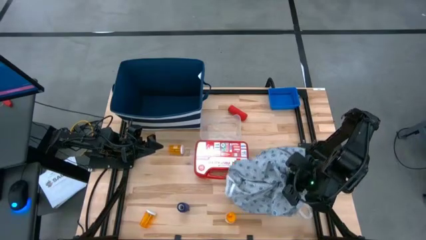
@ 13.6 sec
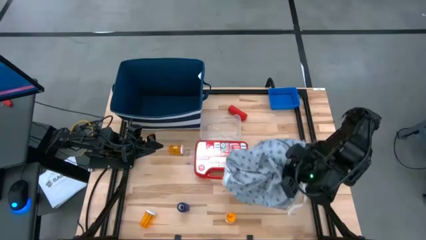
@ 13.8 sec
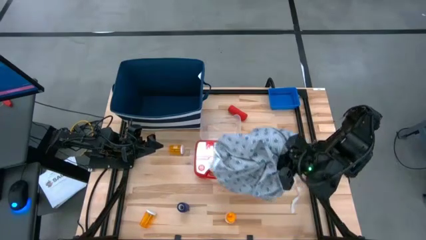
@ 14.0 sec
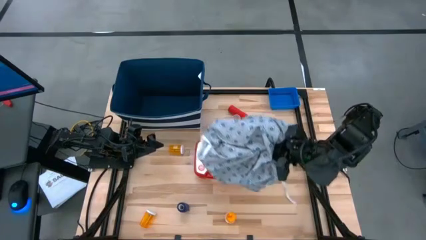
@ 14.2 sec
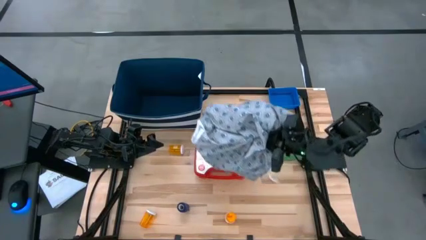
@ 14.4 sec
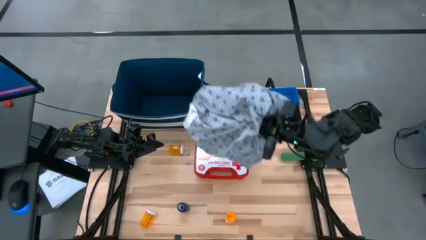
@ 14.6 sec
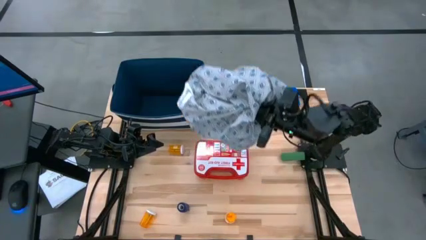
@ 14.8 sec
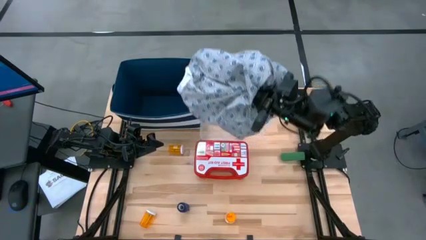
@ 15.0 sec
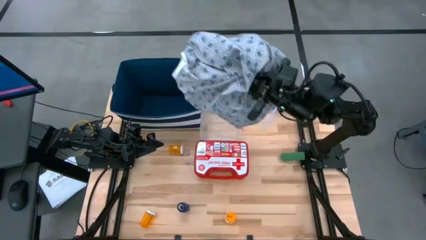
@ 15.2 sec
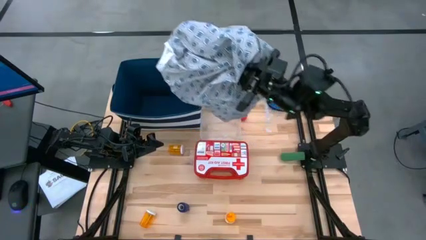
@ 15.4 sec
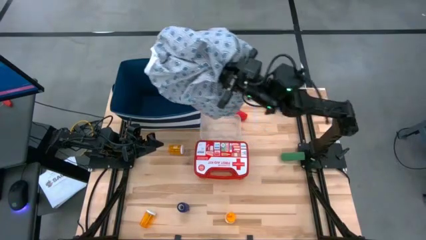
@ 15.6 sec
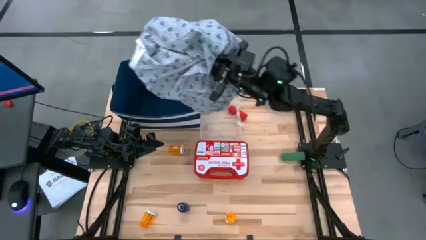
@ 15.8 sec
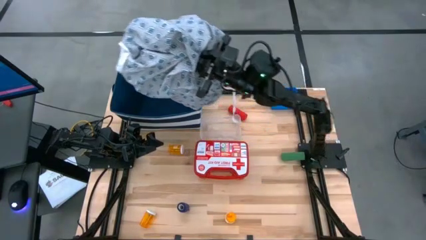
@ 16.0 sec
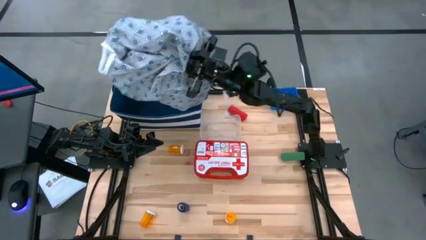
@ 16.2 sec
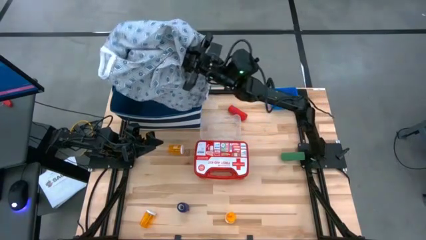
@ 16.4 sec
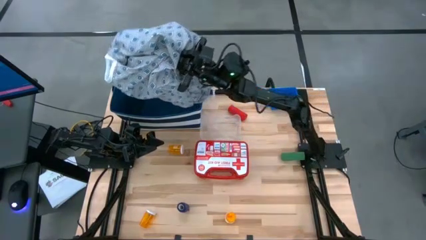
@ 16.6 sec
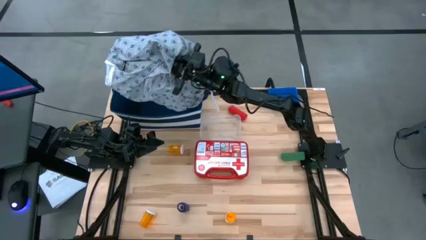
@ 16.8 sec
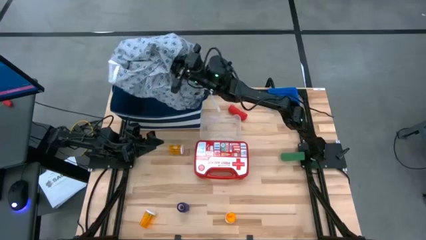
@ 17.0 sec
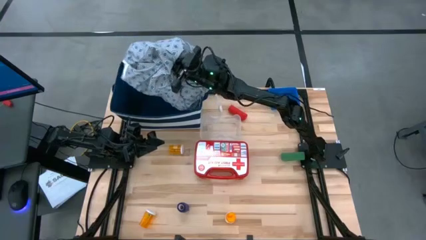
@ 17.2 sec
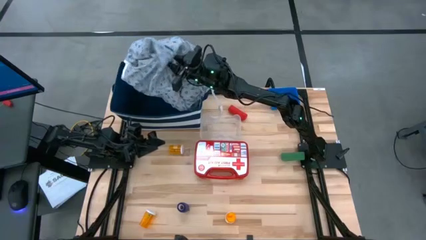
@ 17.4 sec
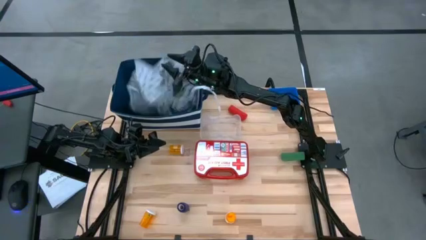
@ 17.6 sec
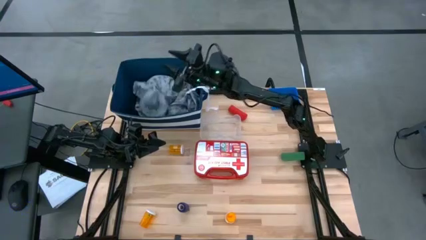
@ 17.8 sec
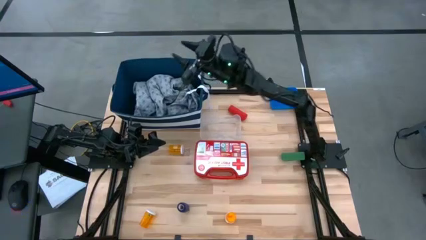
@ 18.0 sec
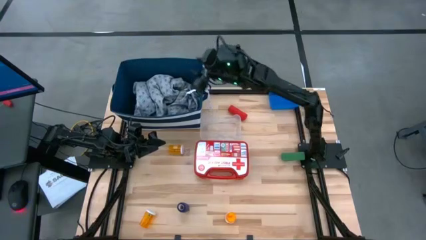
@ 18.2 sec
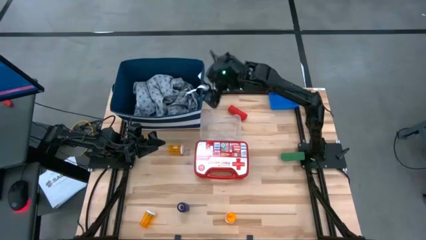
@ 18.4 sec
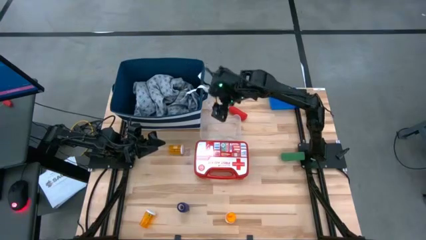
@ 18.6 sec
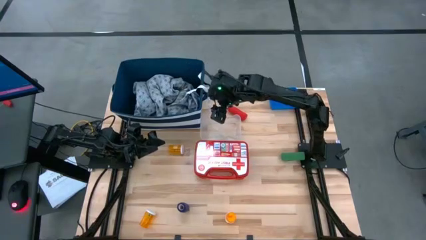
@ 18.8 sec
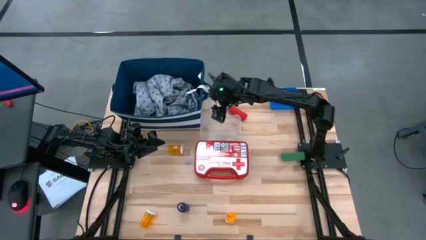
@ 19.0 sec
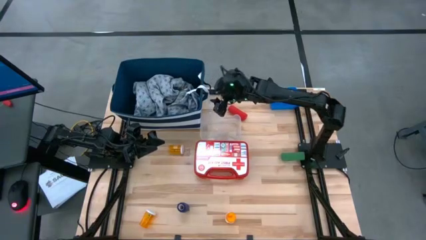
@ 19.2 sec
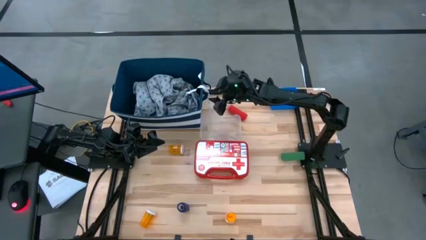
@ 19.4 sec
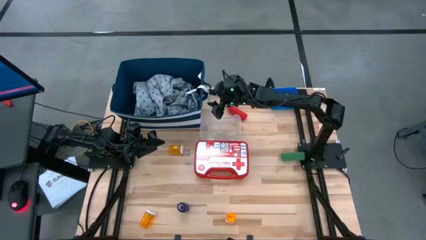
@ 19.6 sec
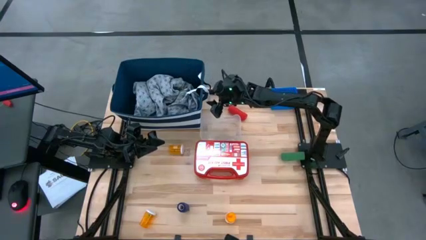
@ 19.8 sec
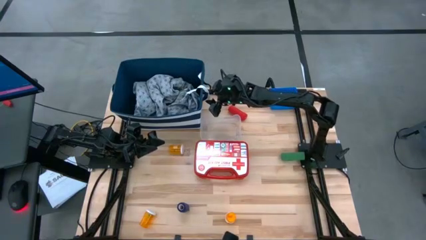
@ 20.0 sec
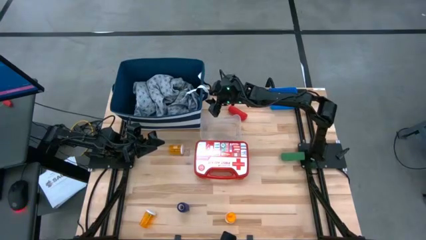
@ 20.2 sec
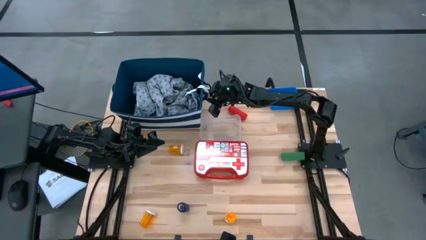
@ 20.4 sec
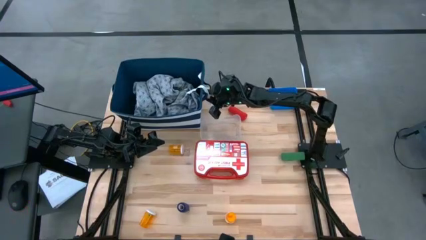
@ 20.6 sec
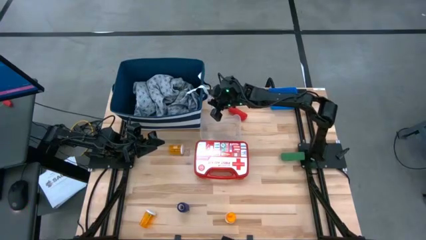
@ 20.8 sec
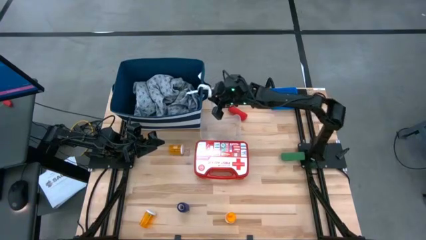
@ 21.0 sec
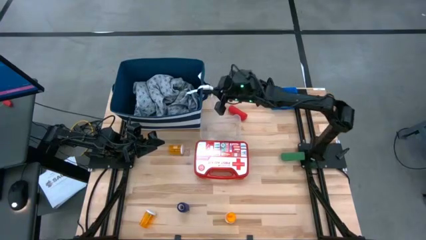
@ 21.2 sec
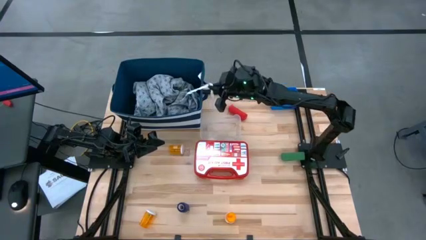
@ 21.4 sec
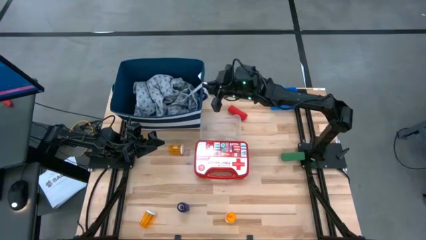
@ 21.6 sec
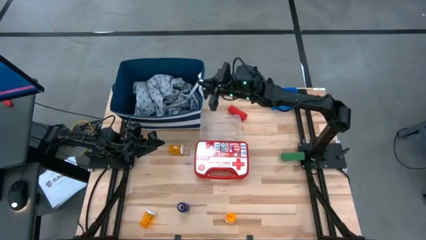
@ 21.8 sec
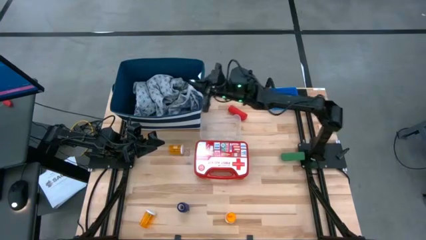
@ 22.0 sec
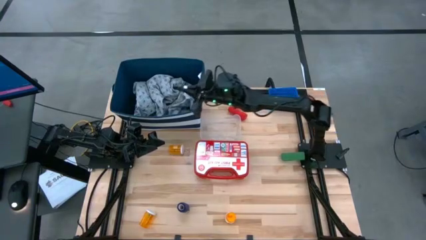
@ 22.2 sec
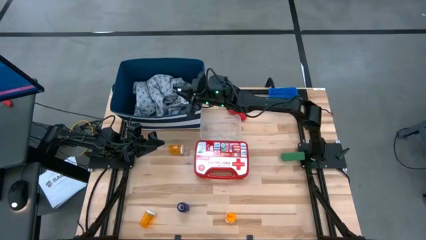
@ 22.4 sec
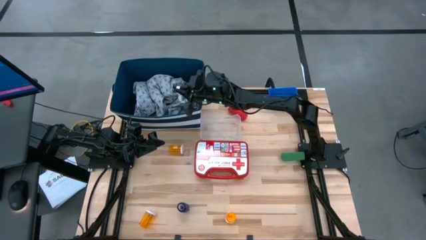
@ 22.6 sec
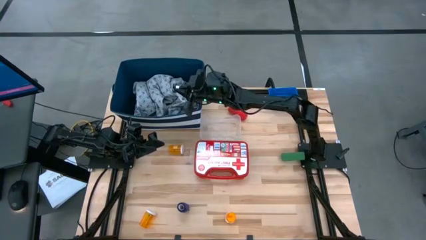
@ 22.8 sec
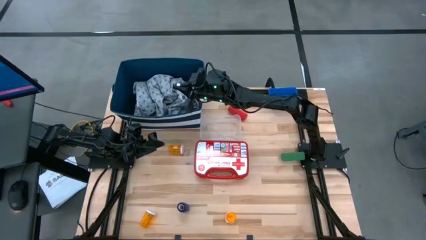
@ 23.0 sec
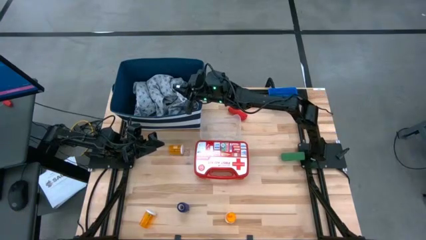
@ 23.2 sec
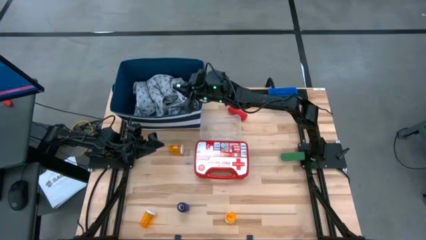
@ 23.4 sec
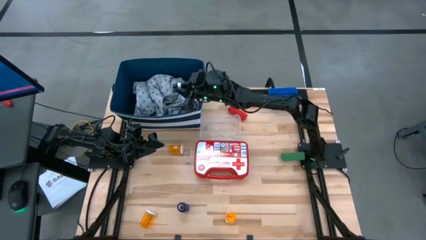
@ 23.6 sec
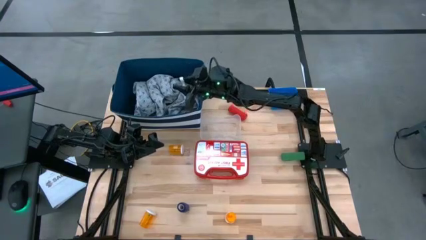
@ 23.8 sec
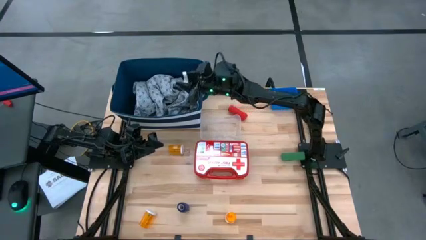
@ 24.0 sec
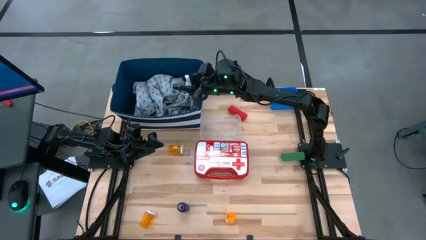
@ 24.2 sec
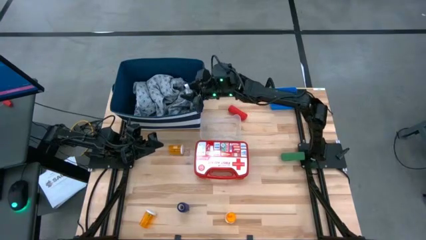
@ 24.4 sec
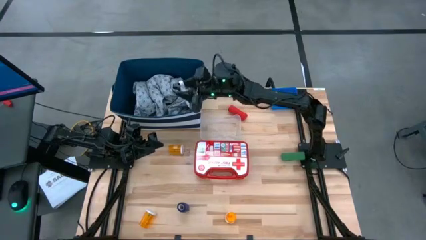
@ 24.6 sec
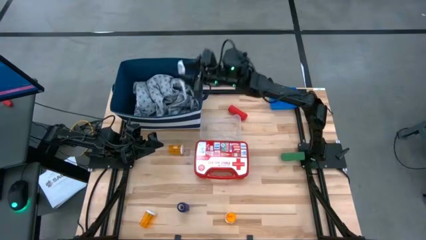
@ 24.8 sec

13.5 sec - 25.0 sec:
Task: Pick & place medical supplies in basket/bin
Put the gray patient gown into the blue laundry organizer

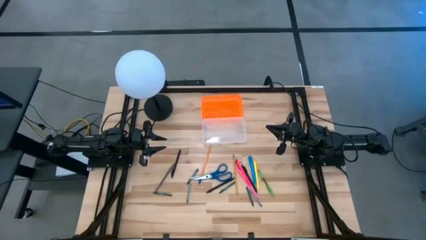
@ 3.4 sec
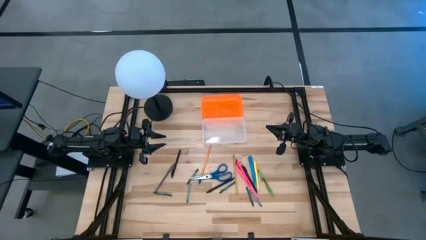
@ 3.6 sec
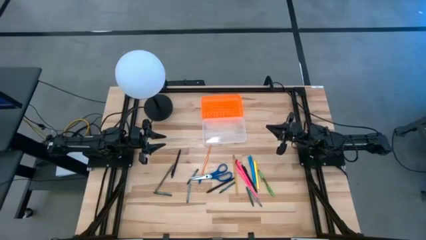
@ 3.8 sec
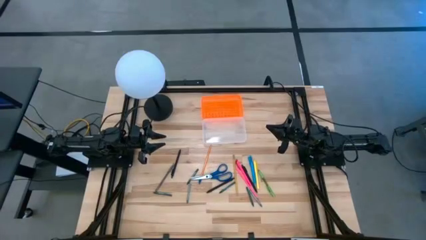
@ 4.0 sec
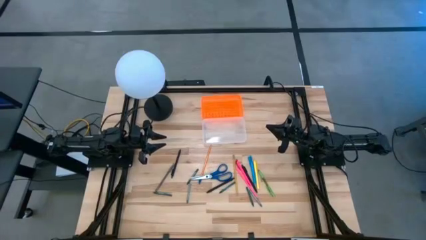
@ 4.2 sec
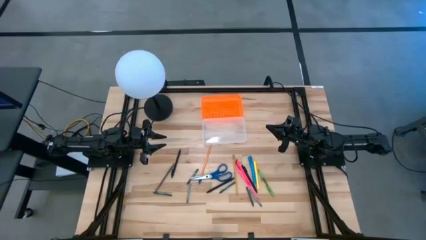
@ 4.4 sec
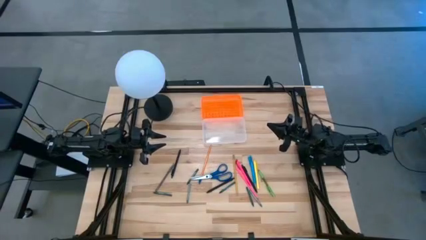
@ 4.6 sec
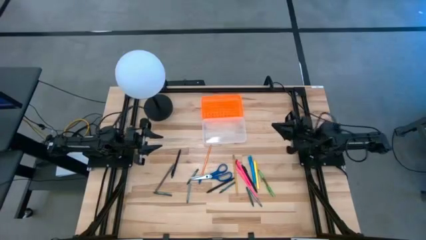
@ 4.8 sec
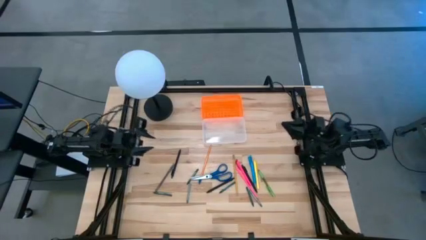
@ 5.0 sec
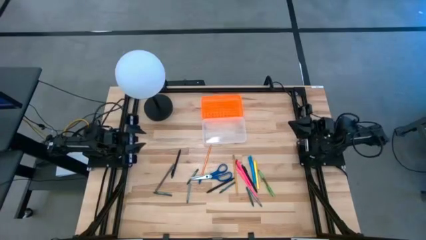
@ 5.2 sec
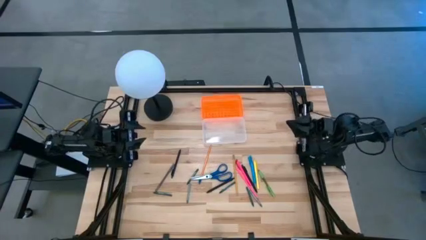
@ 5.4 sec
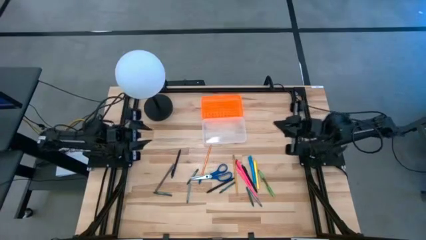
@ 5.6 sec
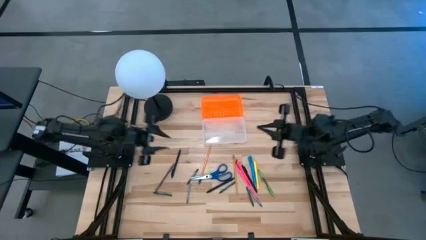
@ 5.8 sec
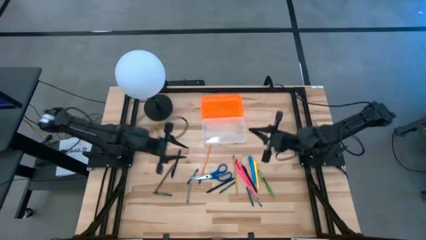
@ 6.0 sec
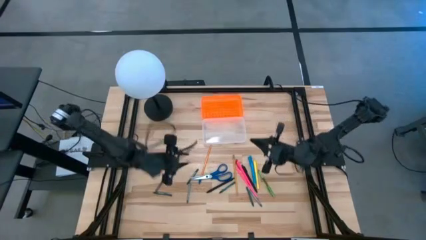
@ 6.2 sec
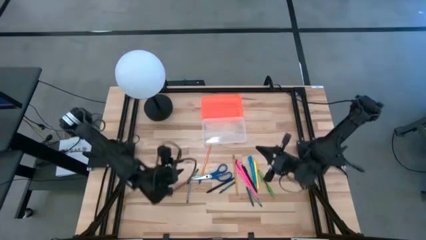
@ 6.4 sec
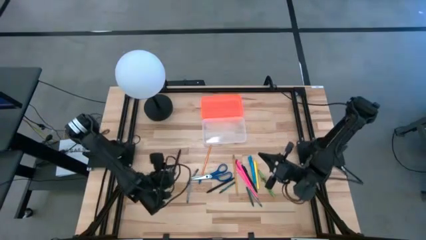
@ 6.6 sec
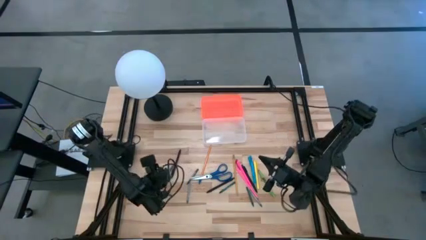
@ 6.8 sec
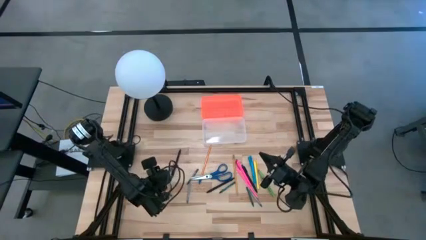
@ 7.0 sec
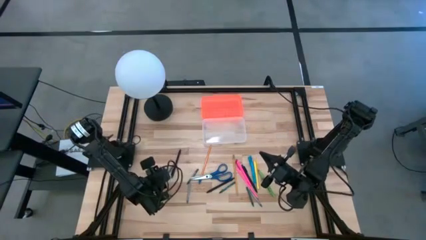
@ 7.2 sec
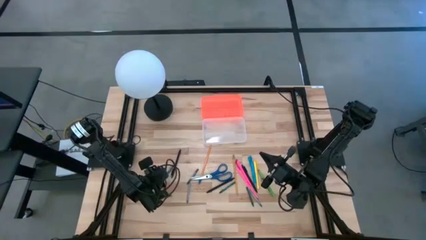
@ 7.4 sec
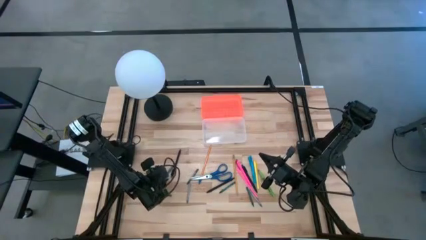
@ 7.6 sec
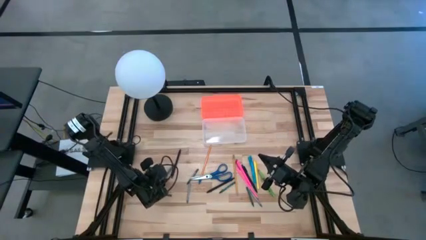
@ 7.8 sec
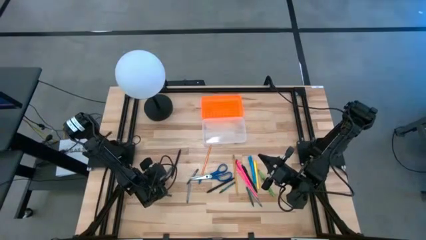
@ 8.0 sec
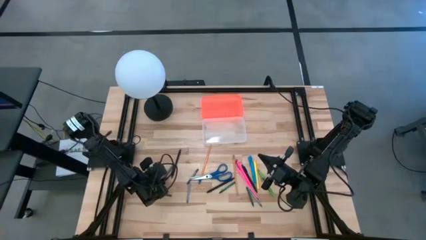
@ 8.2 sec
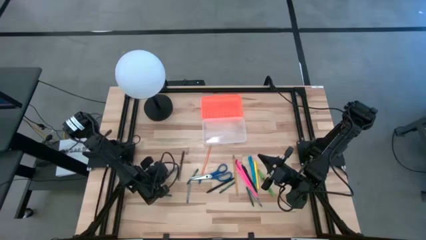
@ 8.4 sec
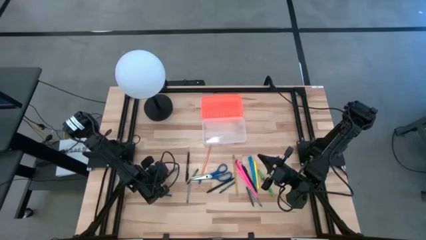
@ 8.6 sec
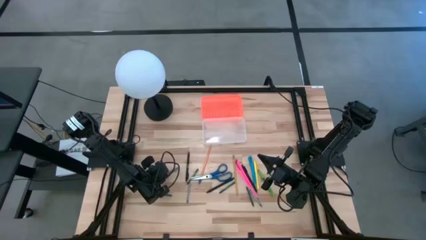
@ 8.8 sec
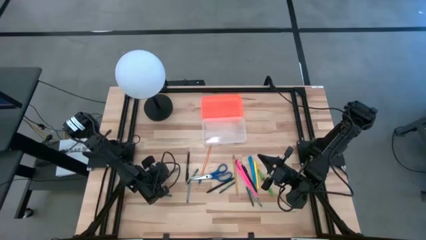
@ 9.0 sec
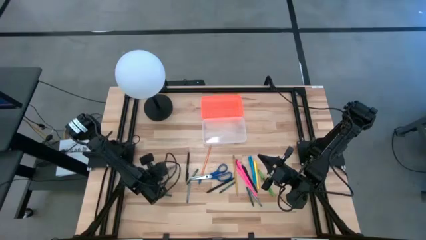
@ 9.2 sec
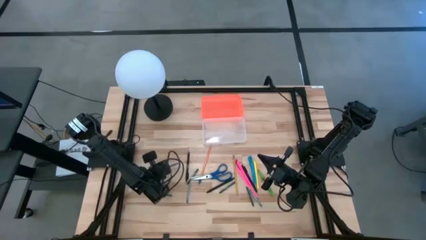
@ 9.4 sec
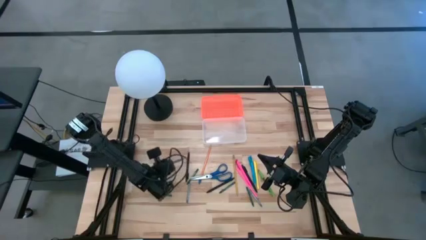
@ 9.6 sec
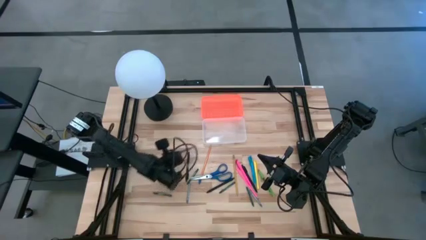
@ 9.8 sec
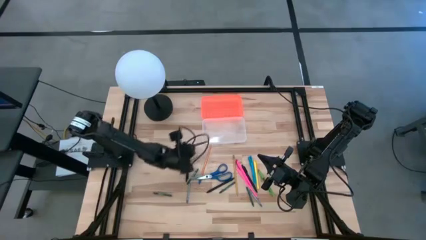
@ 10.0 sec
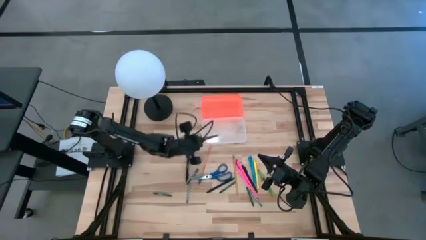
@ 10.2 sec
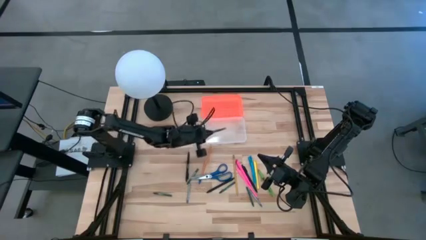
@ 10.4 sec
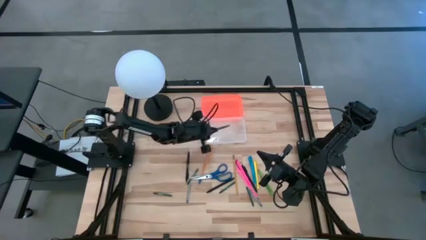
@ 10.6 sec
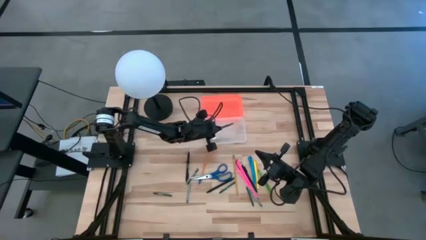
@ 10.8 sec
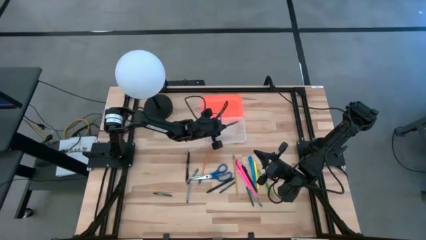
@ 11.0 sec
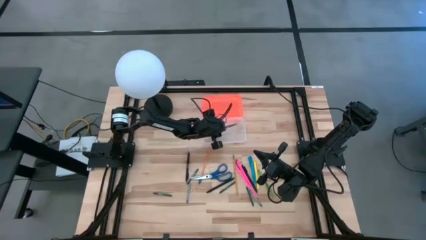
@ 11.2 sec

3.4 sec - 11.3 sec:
Task: Pick & place school supplies into a supply box
Put the gray pen into the orange supply box
